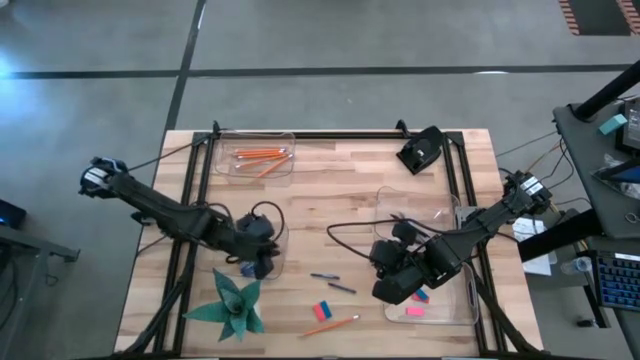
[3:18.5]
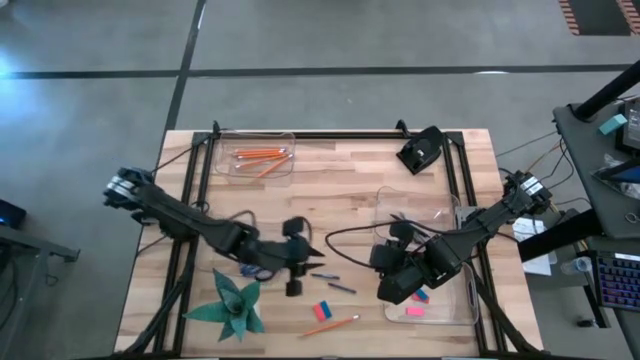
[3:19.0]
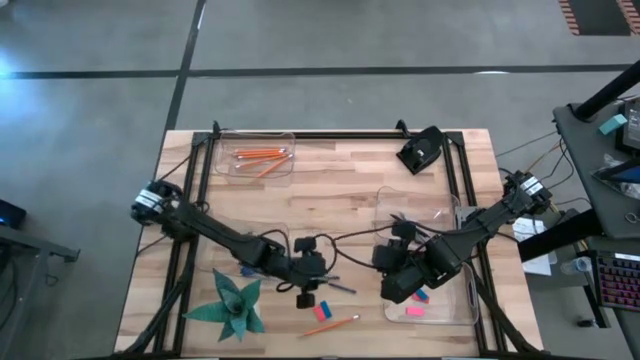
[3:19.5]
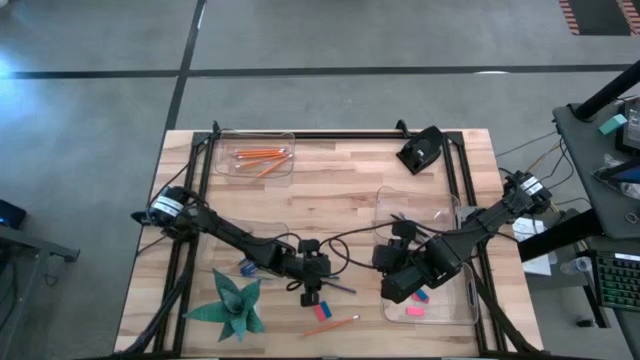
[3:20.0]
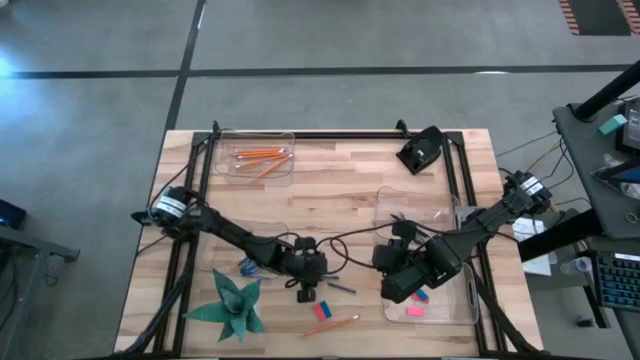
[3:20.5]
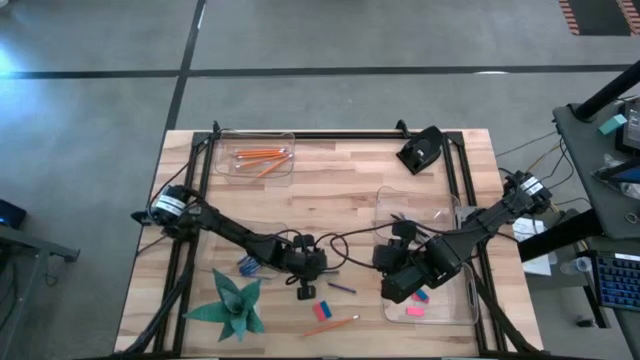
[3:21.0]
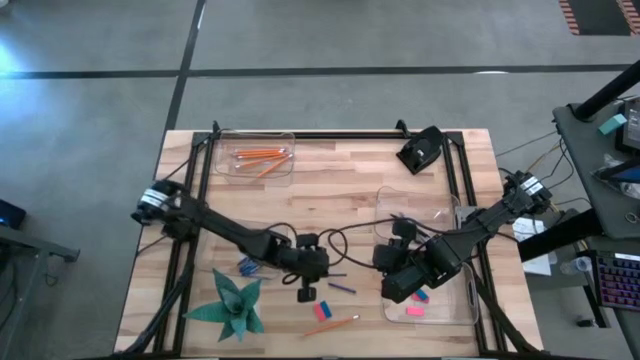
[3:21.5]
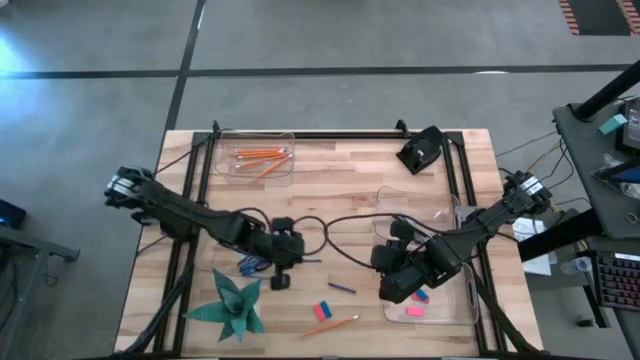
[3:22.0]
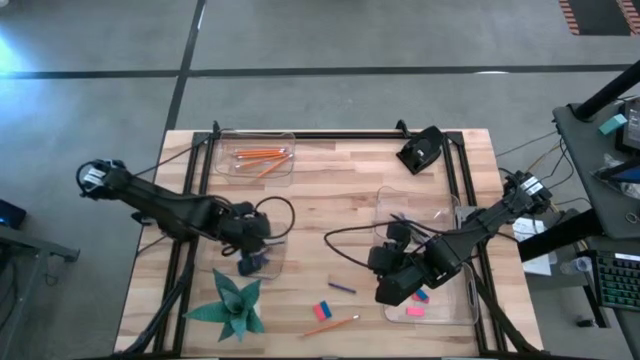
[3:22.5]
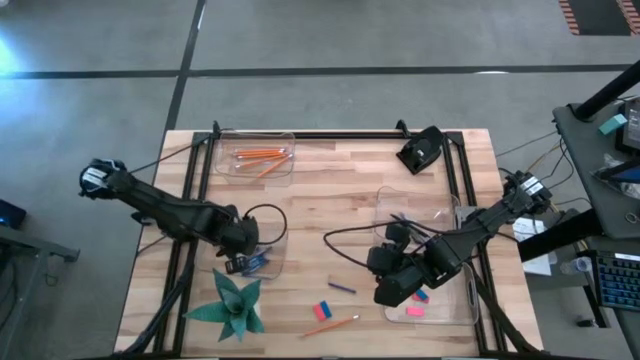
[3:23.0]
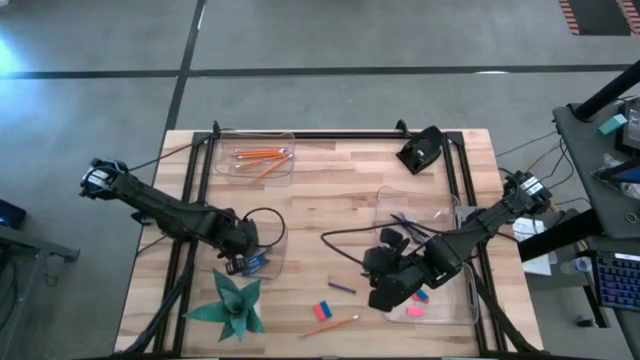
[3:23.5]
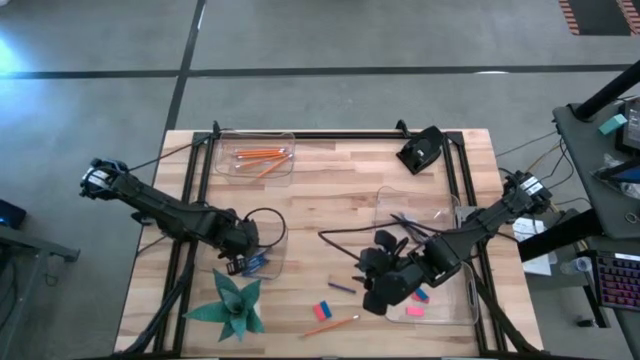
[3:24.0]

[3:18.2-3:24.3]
Task: Sort crayons/erasers/pens/pencils in bins
Put the blue crayon into the left center transparent bin

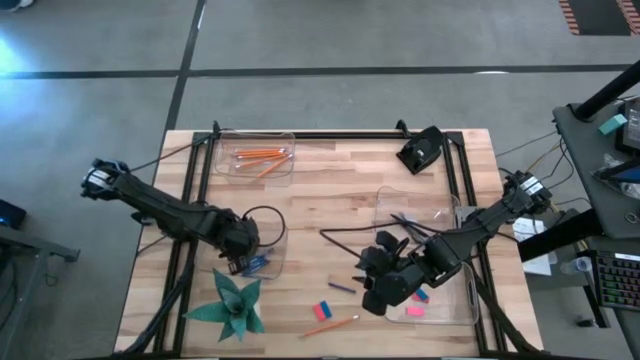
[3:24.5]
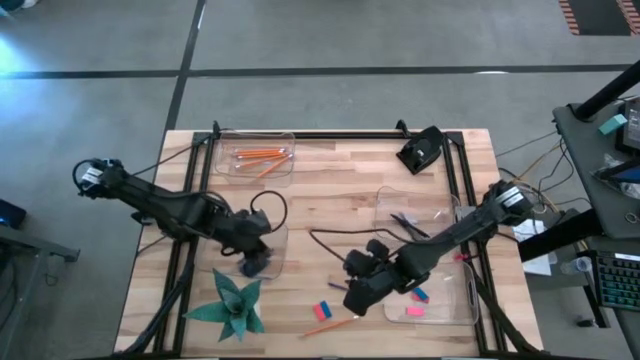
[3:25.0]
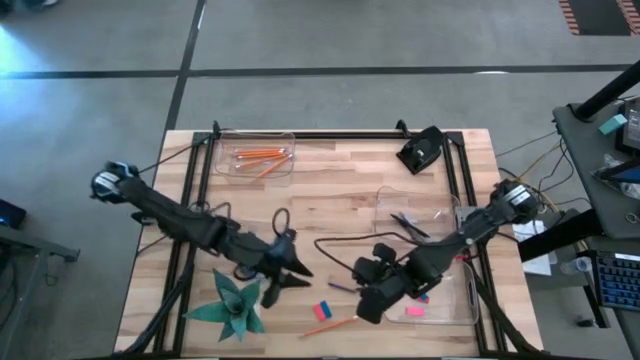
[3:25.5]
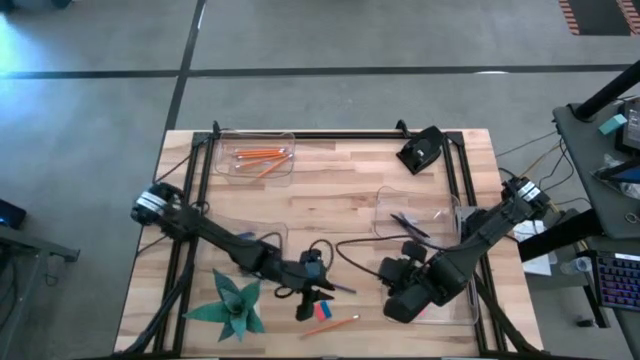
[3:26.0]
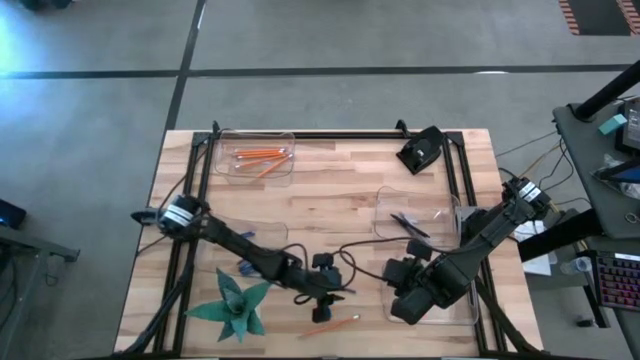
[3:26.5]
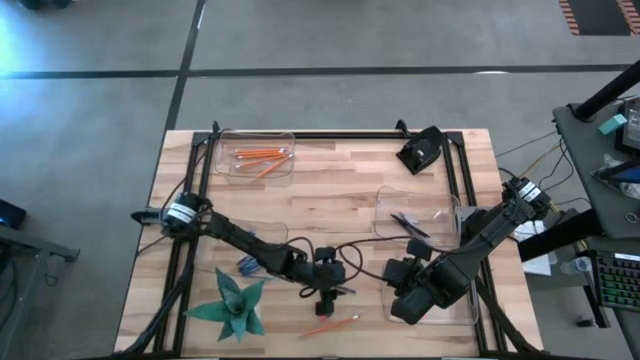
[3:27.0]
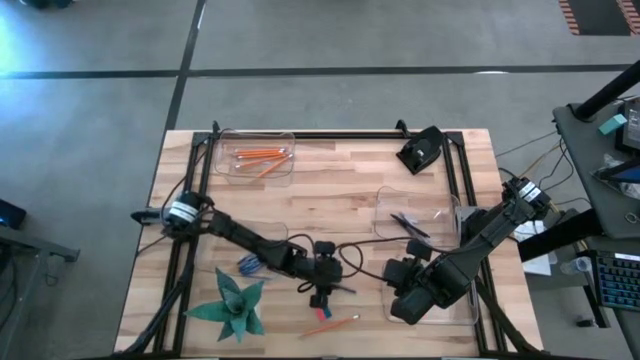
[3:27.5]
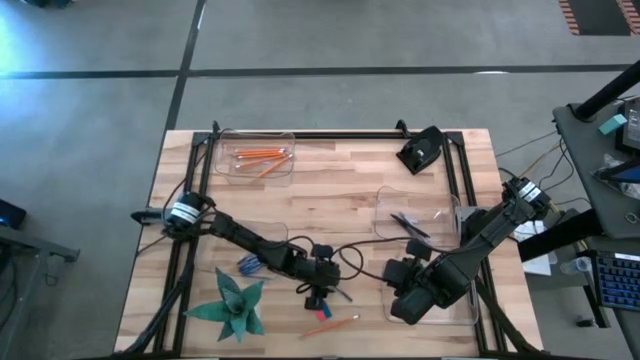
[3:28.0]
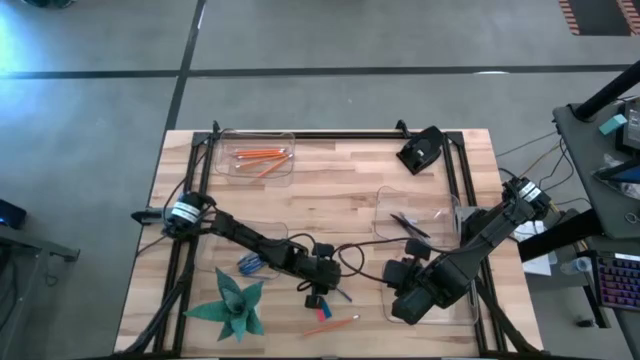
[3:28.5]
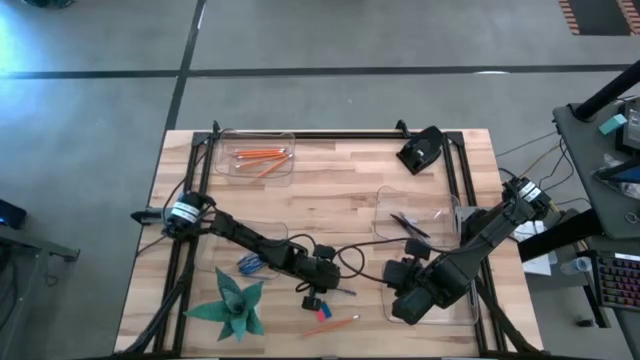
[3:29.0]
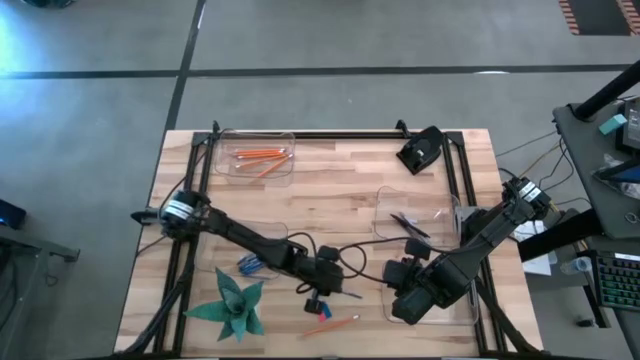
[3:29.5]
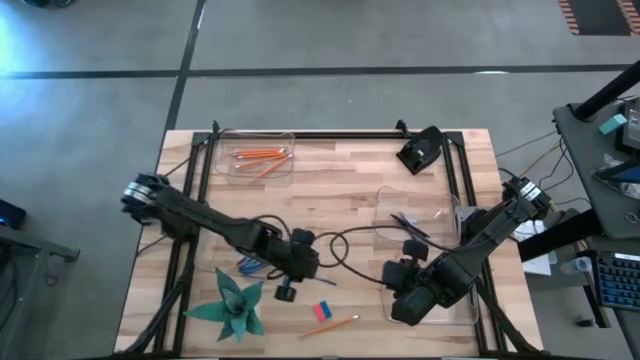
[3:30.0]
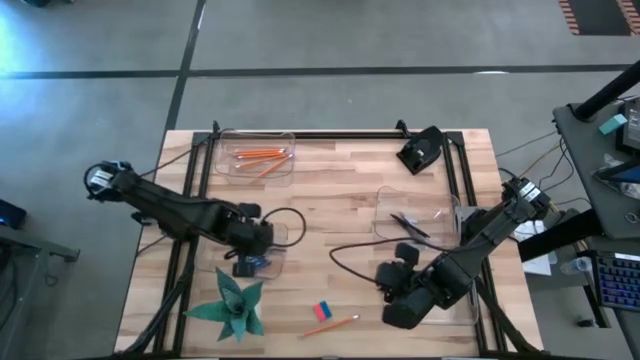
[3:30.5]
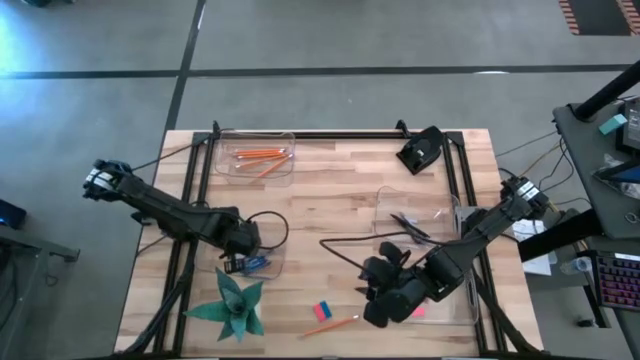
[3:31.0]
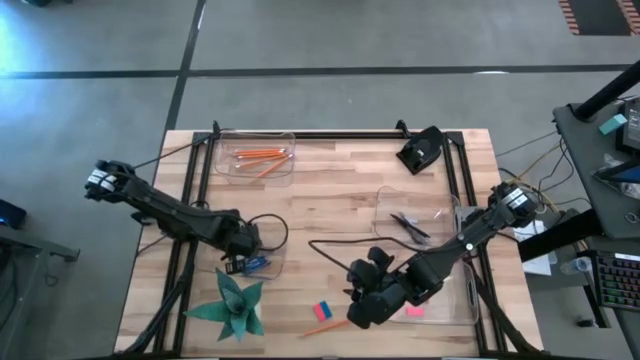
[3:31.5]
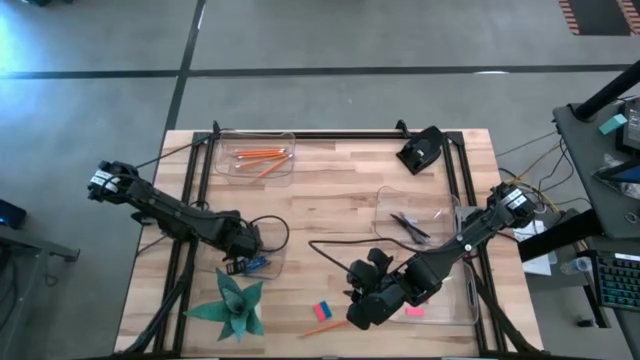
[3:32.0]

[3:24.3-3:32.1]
Put the blue crayon into the left center transparent bin

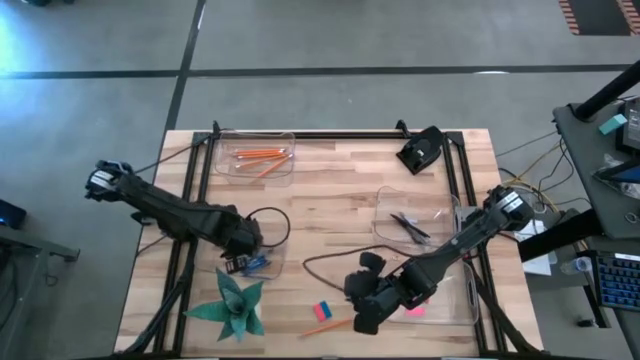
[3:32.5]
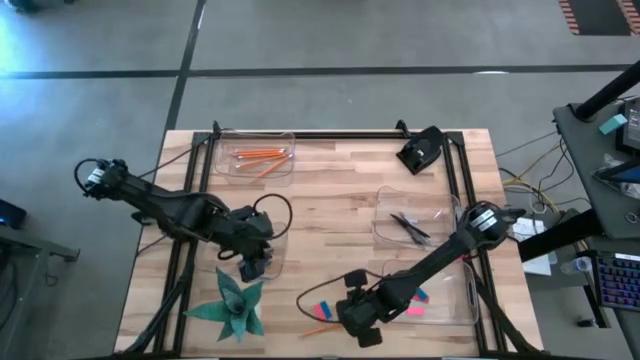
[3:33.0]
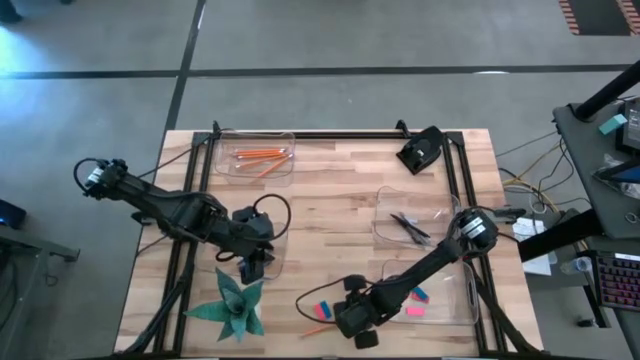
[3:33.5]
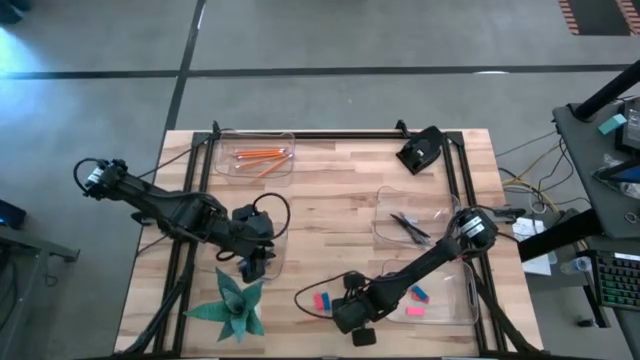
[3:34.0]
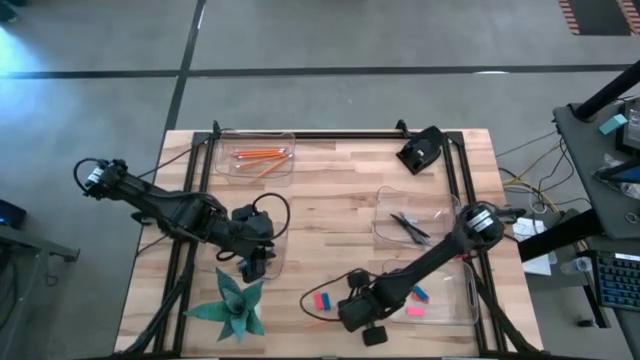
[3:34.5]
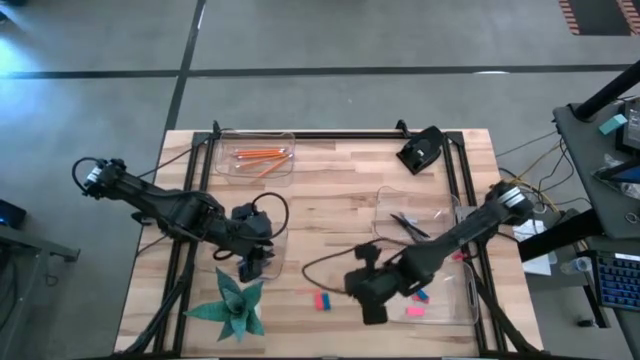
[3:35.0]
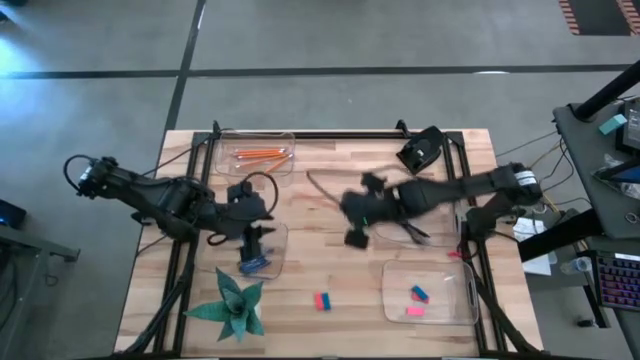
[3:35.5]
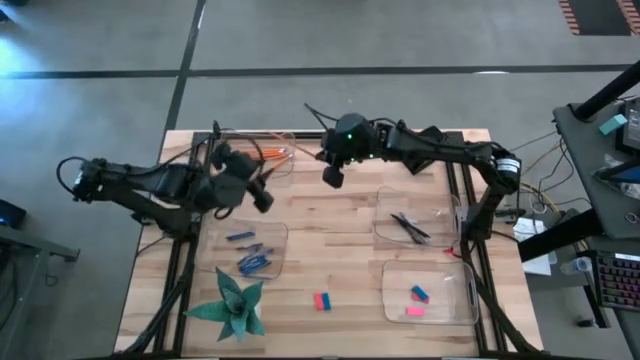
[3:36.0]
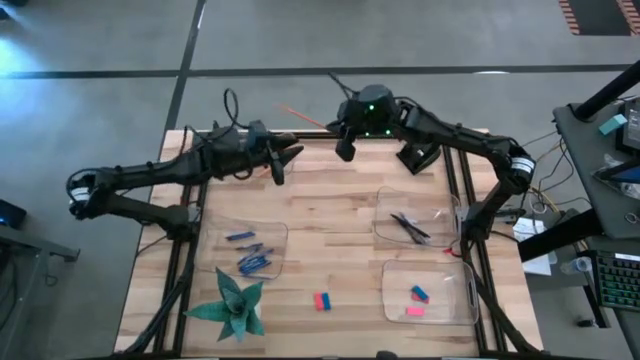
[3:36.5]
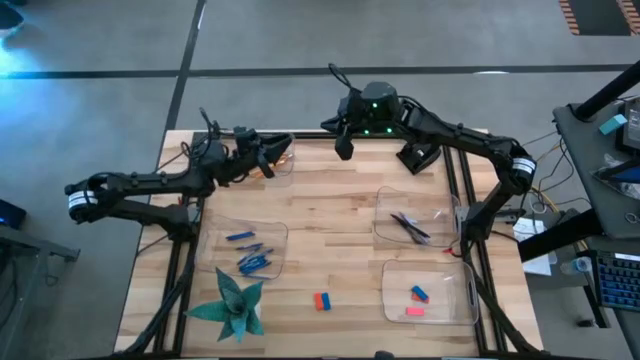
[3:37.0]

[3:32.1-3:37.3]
Put the pencil into the top left transparent bin

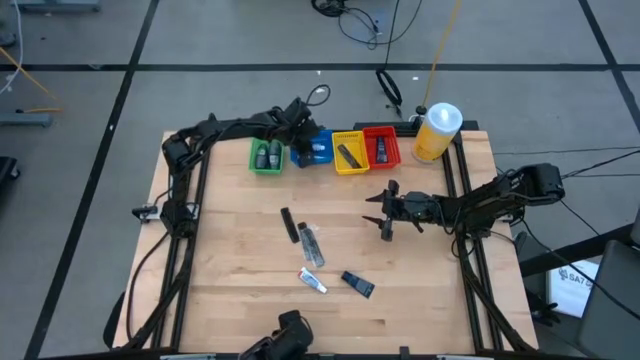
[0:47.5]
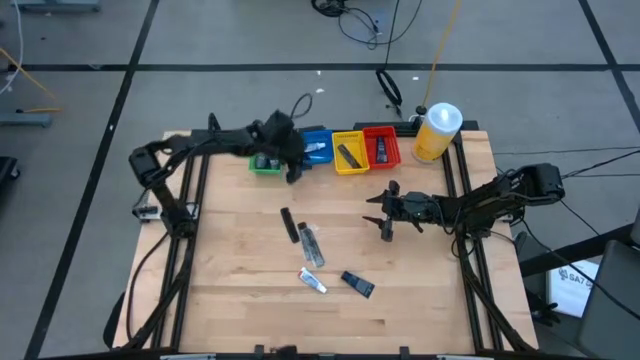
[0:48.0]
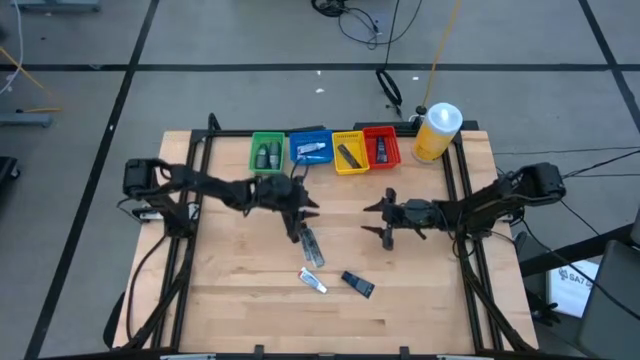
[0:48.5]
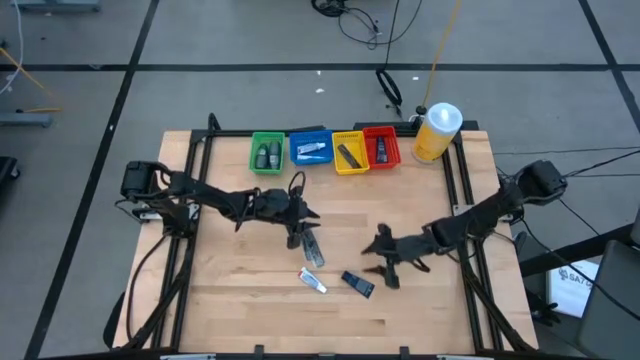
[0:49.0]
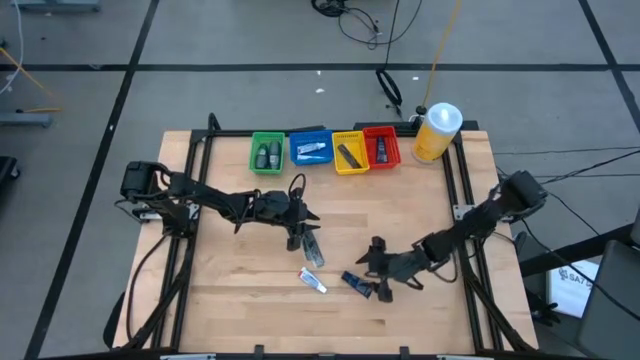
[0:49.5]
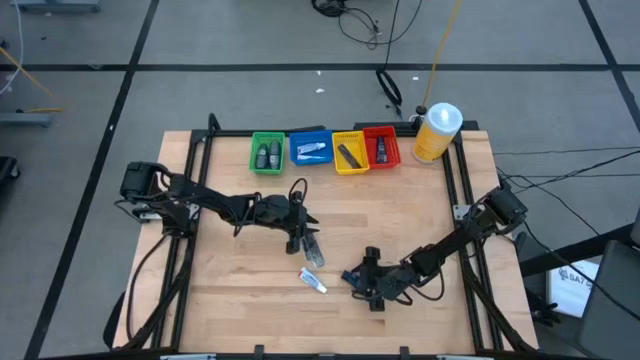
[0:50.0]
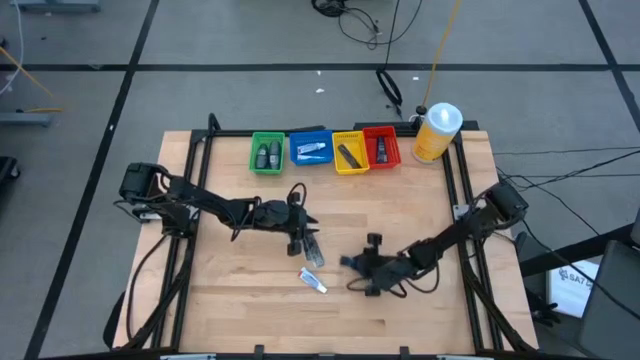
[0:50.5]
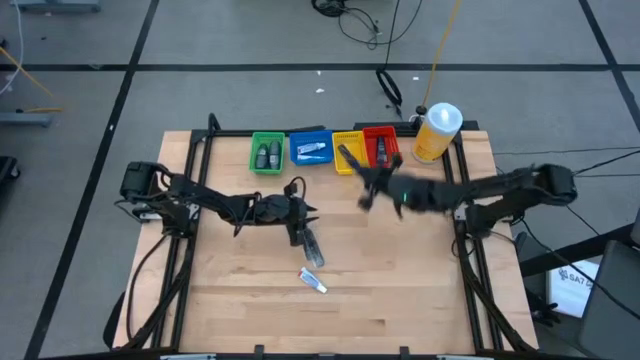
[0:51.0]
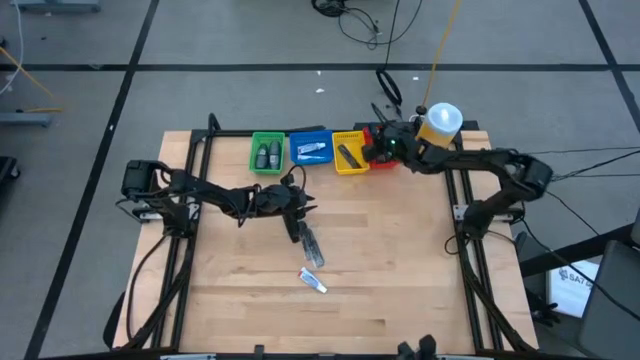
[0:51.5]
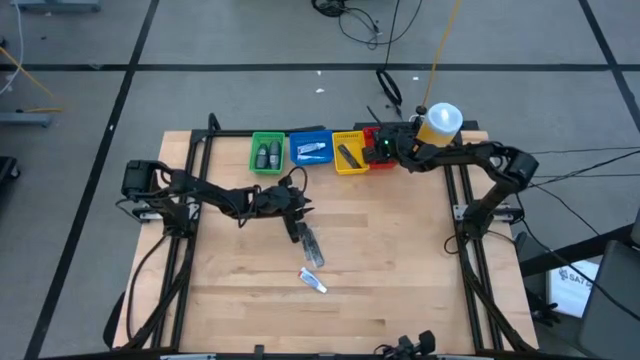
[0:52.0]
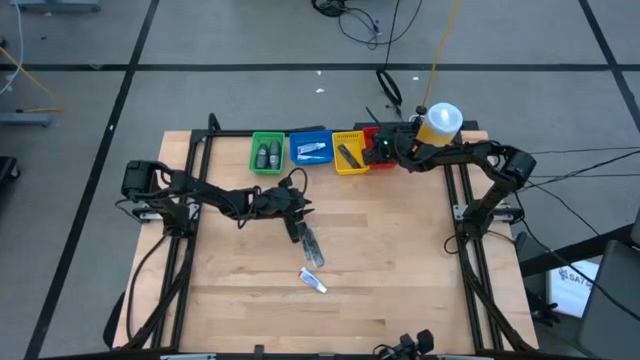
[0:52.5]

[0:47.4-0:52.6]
Task: Pick & Place Travel size toiletries
Put the blue shave cream into the red bin
